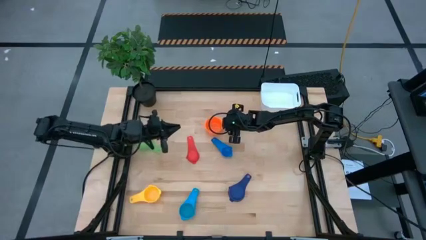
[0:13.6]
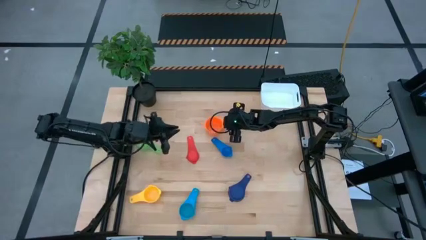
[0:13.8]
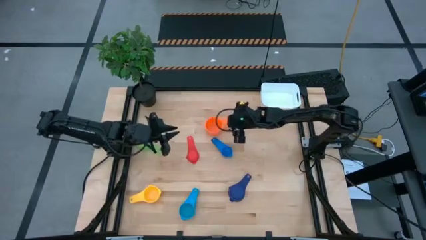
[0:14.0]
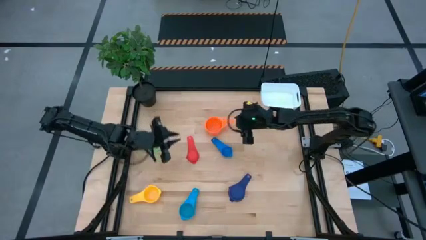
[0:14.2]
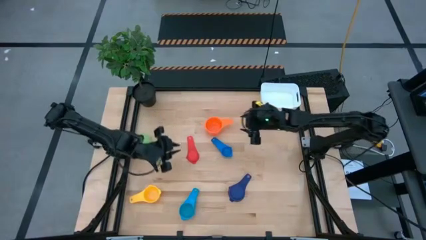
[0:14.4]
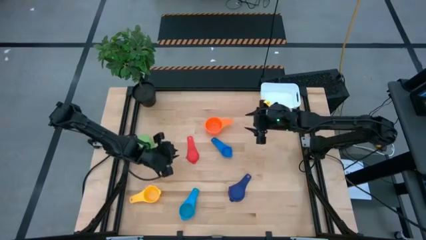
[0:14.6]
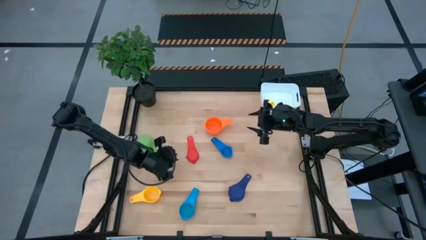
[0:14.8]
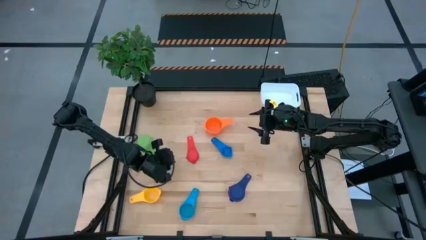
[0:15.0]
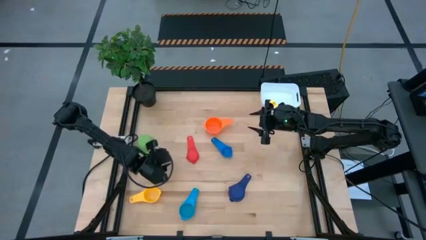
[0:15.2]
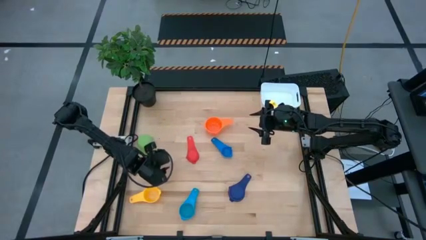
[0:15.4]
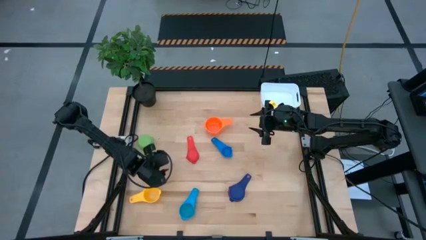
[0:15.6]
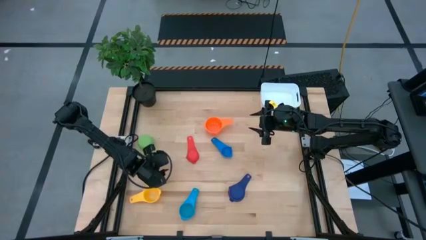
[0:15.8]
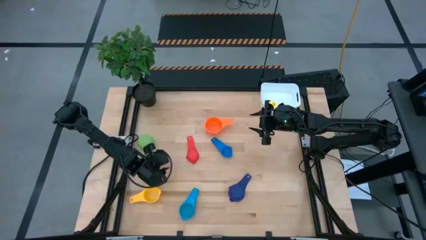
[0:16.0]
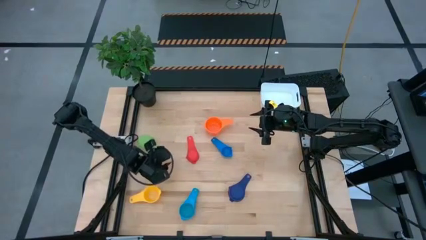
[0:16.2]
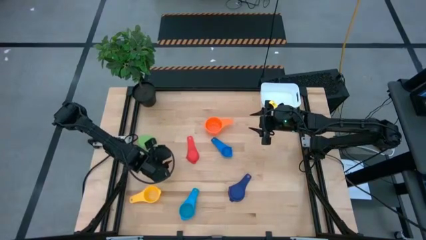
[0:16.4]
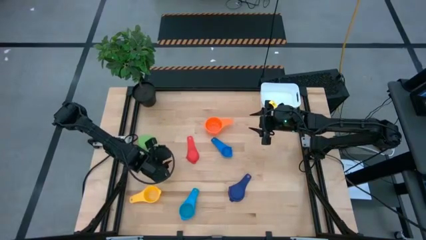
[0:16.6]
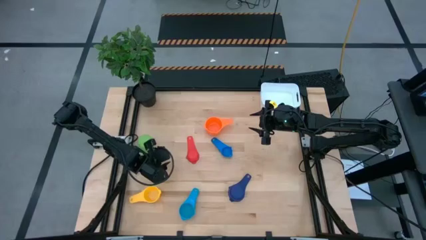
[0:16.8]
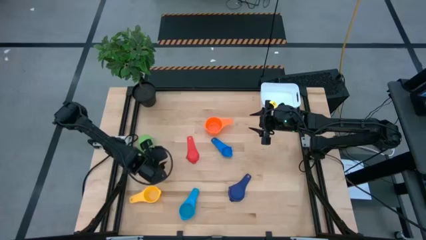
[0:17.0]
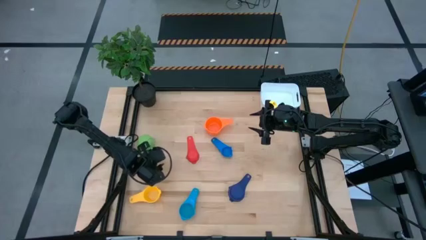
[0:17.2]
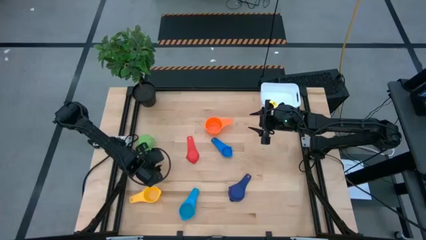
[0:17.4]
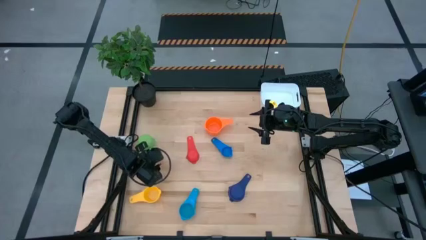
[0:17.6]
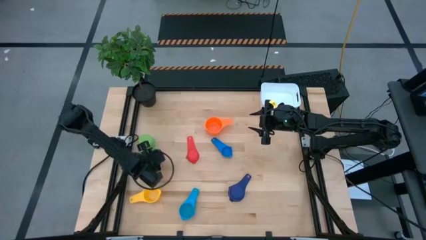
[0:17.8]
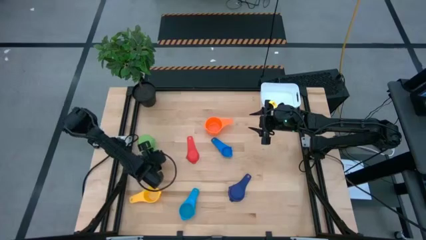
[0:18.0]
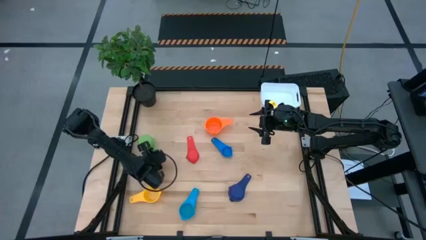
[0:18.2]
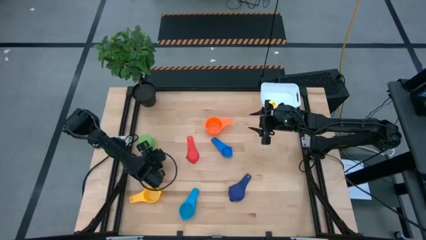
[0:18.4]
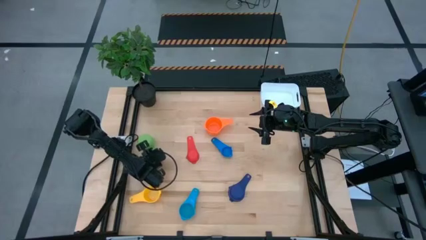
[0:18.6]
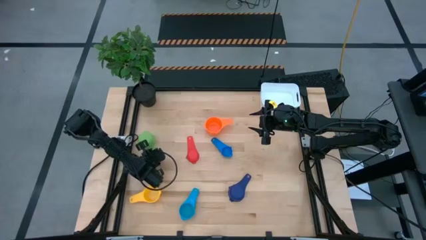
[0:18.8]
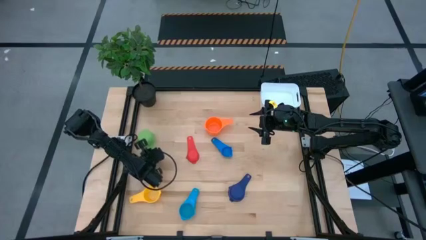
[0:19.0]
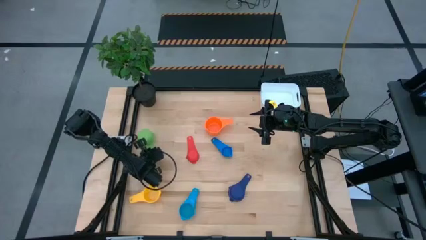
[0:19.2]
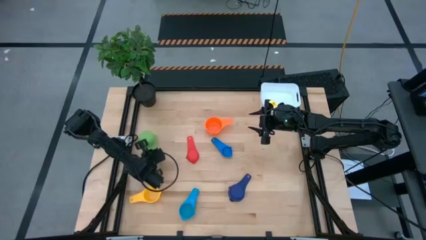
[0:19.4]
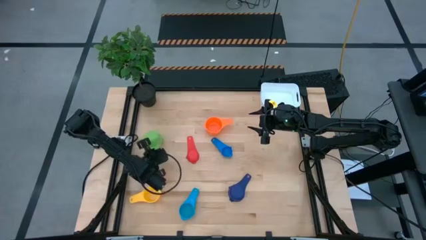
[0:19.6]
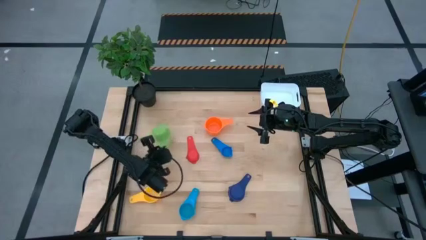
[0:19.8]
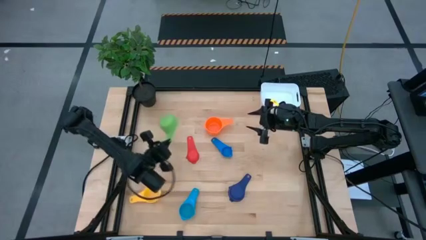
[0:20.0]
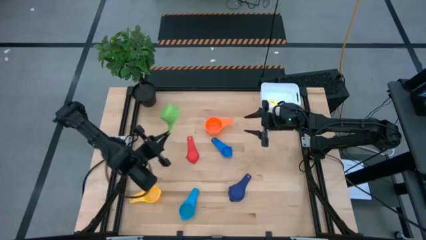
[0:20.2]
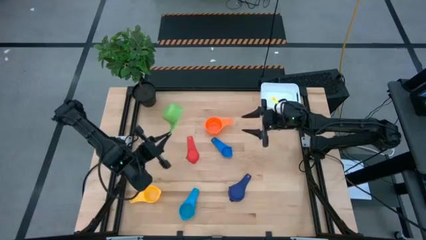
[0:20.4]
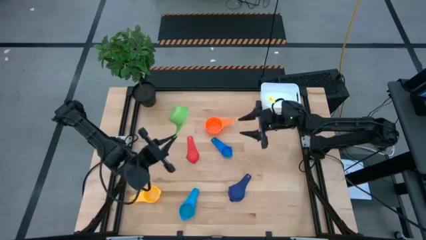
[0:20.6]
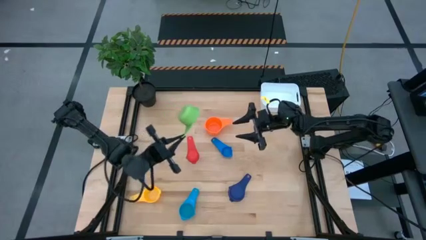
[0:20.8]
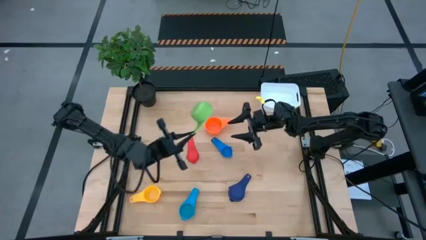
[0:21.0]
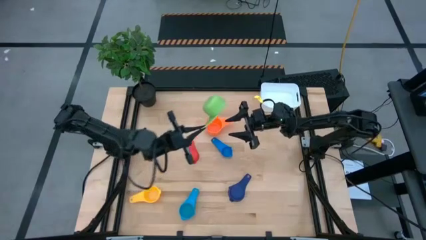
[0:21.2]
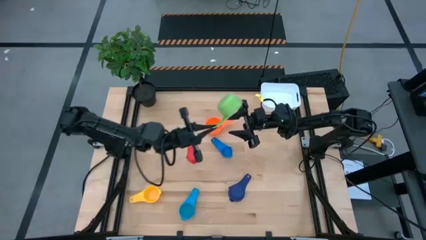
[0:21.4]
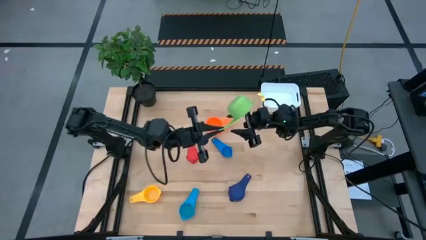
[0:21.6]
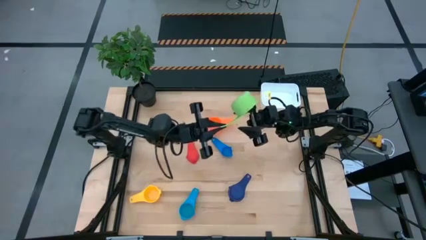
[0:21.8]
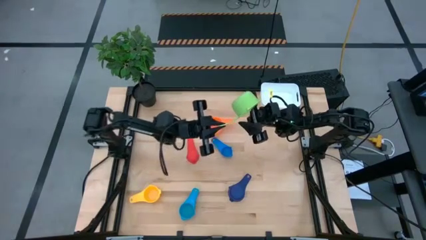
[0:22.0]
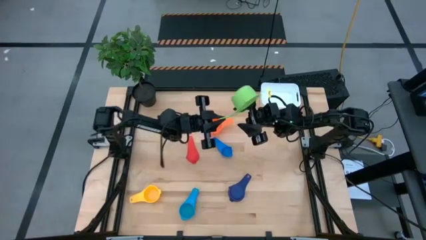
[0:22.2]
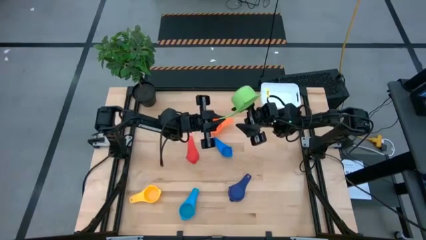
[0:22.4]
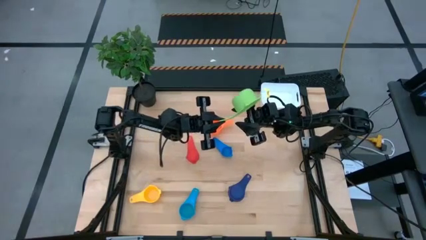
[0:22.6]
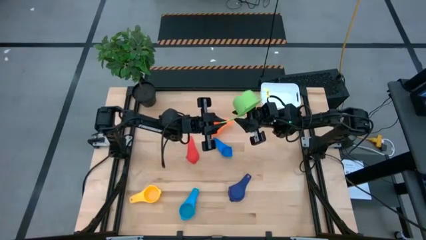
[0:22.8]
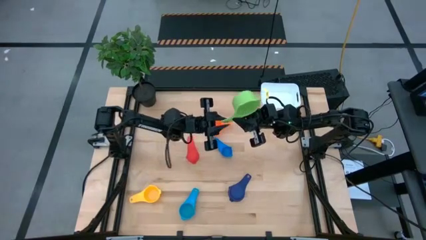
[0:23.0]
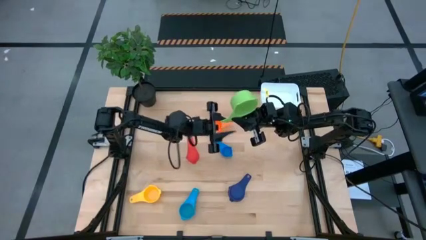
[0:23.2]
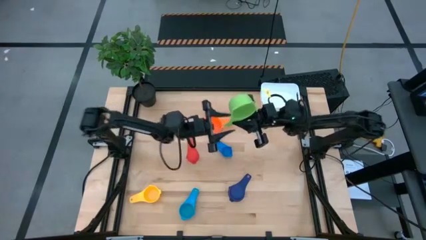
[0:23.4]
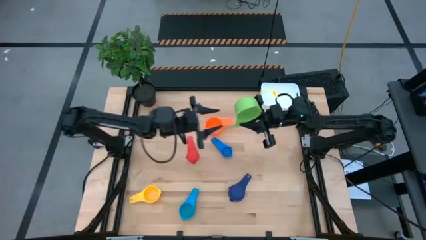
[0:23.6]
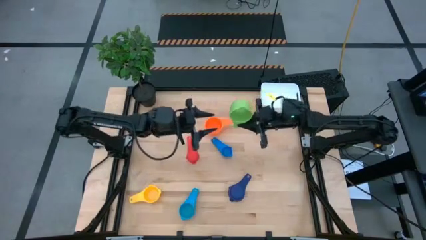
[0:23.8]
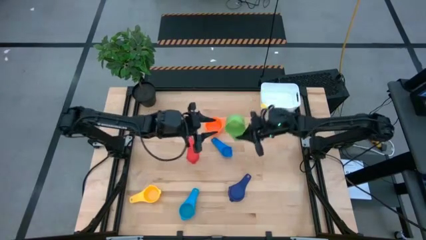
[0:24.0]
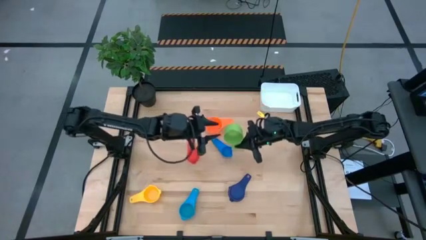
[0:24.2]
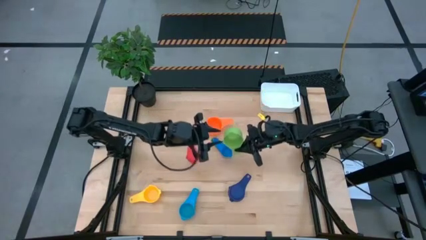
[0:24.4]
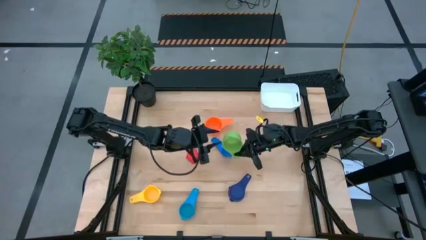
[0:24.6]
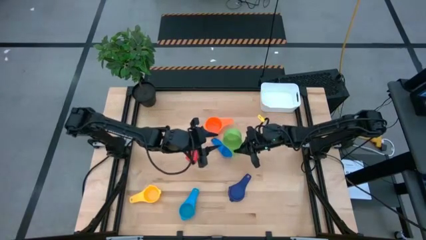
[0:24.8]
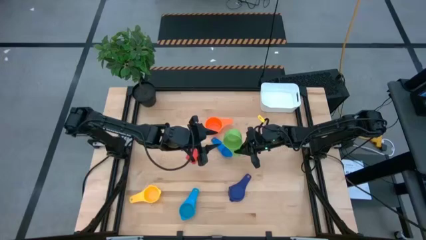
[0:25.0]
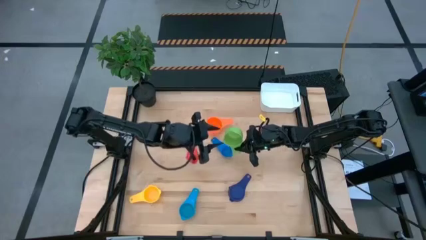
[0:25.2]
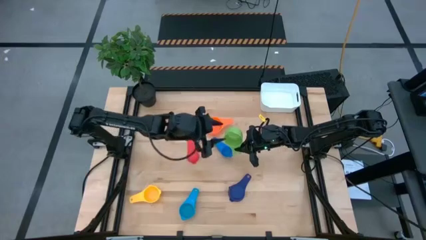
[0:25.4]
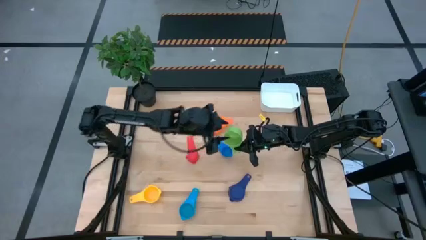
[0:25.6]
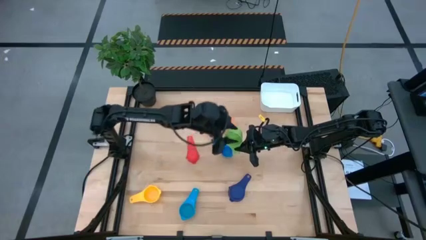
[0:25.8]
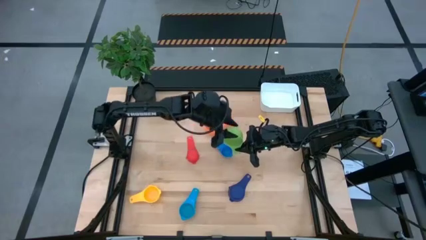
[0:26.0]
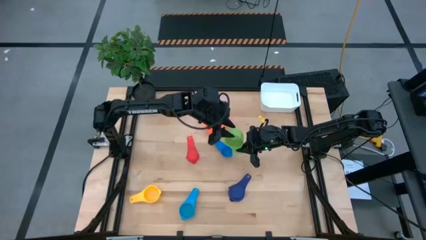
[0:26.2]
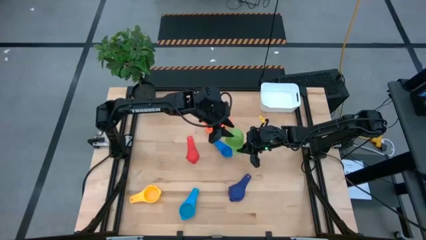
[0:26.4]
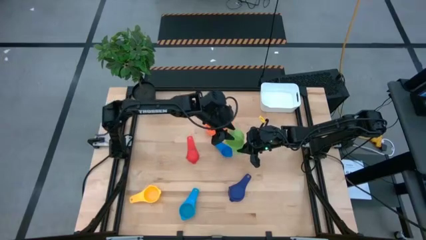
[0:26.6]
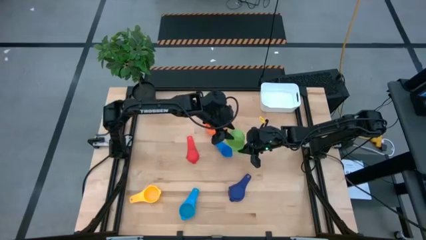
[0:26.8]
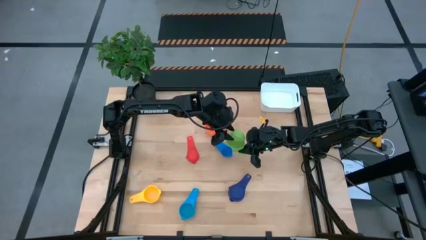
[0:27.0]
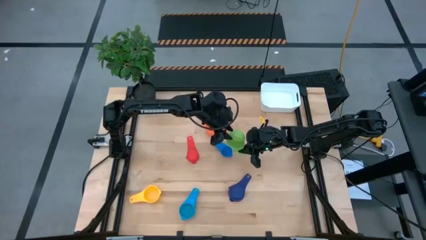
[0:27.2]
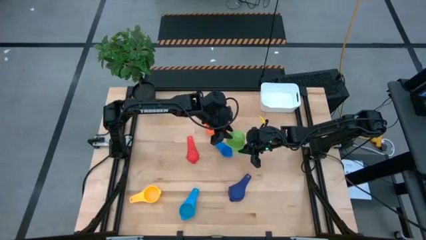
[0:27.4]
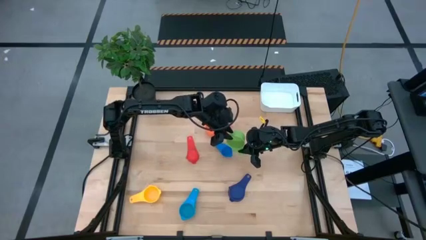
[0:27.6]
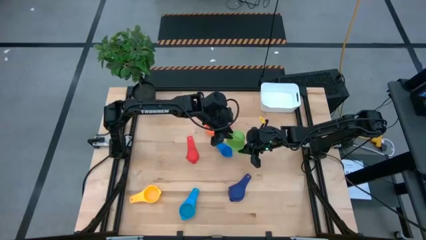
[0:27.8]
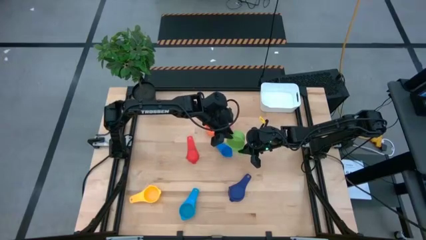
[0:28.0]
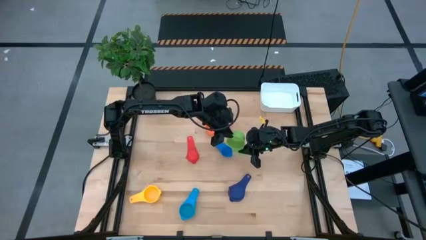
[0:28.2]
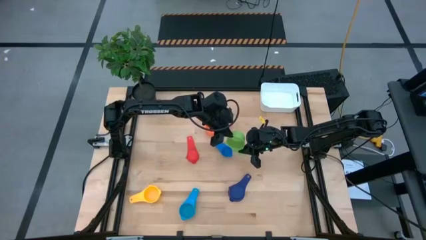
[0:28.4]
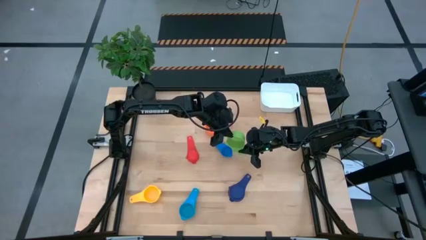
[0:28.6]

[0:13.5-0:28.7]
Task: Nest measuring cups in basket
Stack the green measuring cup into the orange measuring cup
